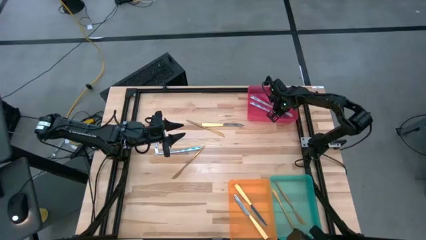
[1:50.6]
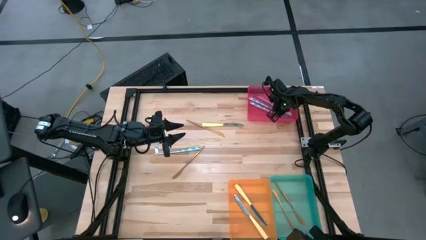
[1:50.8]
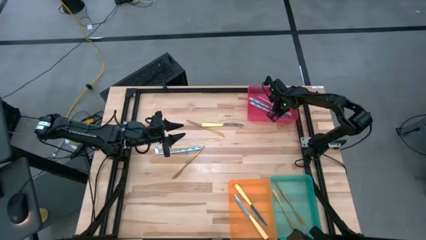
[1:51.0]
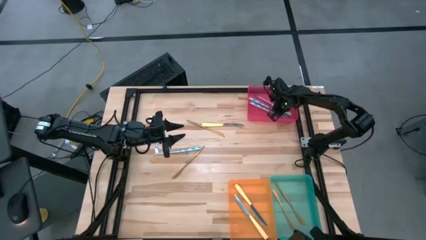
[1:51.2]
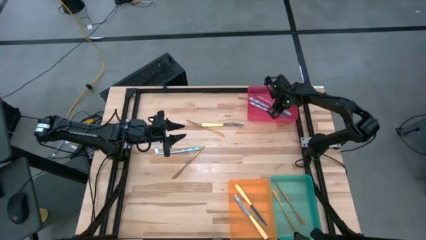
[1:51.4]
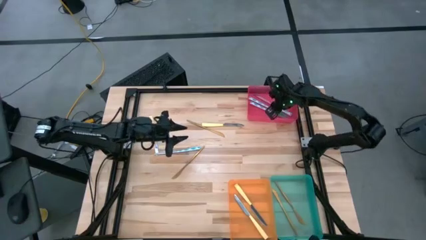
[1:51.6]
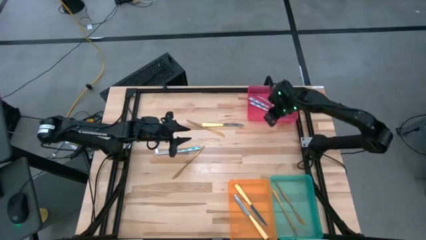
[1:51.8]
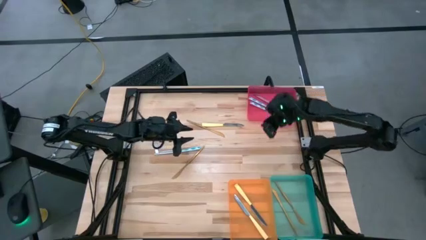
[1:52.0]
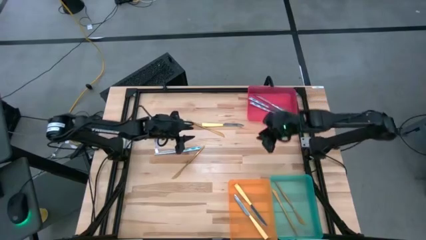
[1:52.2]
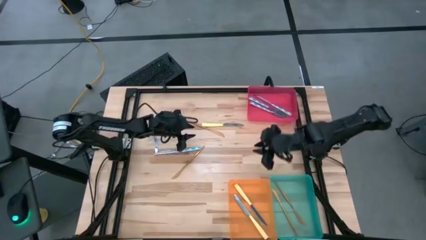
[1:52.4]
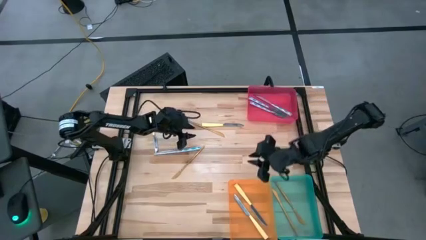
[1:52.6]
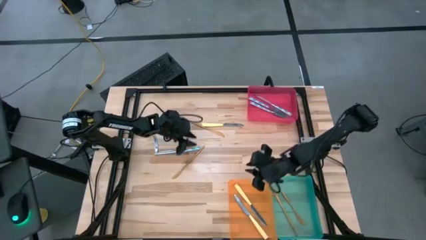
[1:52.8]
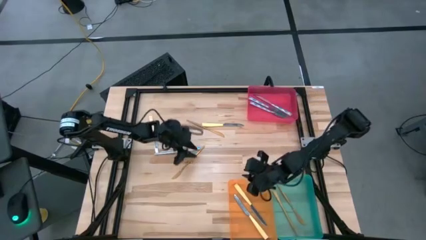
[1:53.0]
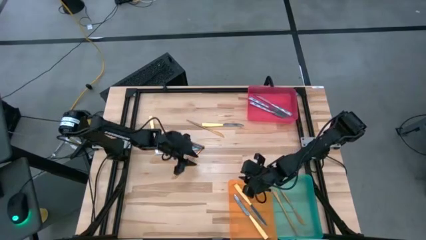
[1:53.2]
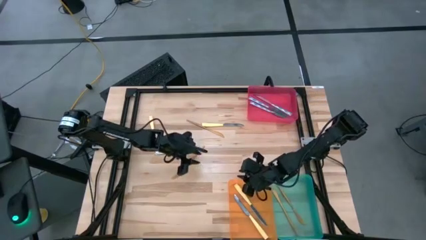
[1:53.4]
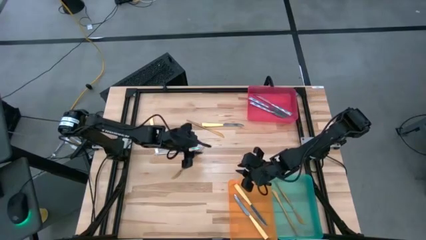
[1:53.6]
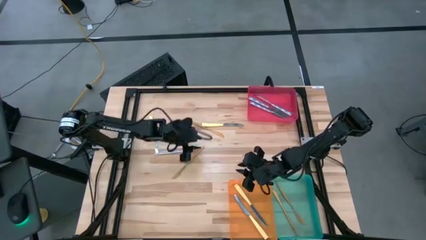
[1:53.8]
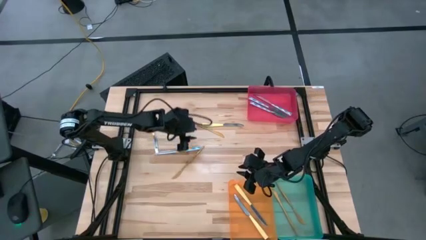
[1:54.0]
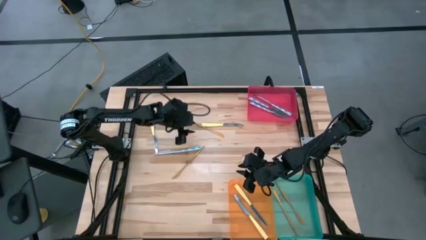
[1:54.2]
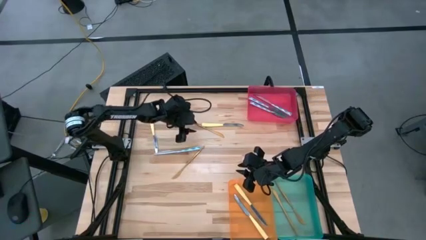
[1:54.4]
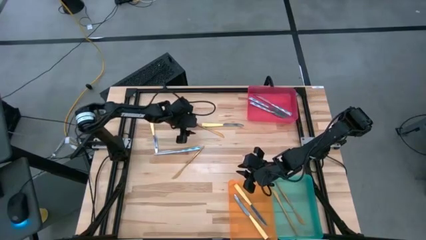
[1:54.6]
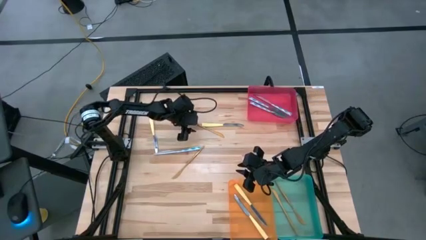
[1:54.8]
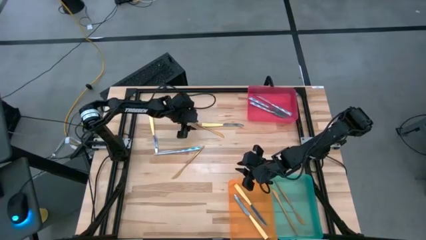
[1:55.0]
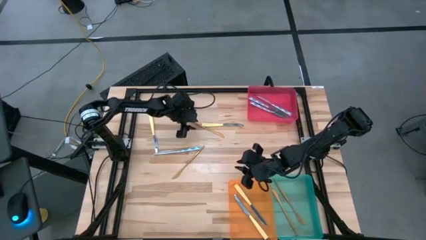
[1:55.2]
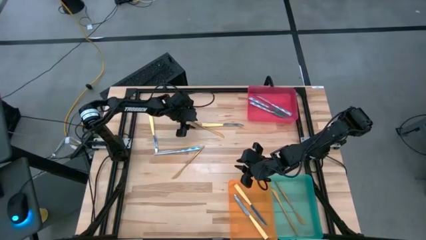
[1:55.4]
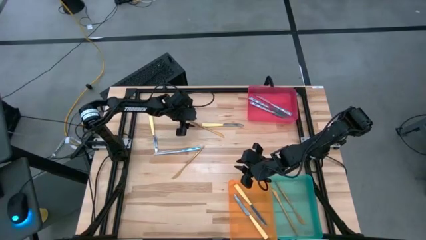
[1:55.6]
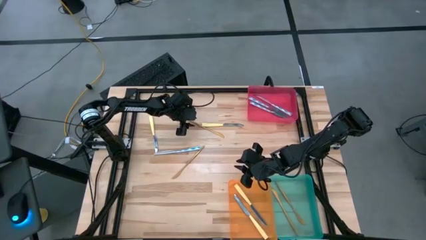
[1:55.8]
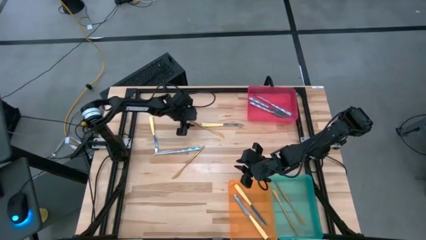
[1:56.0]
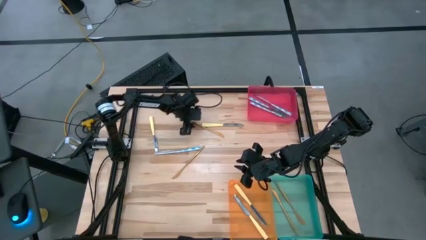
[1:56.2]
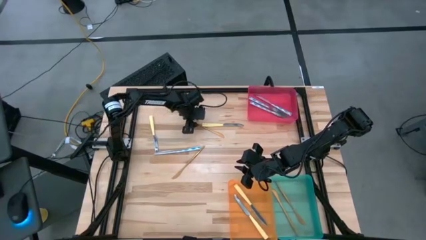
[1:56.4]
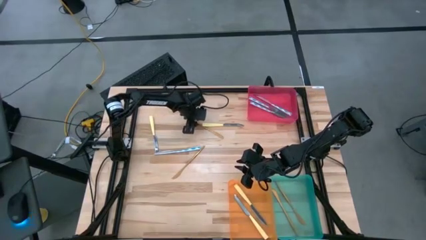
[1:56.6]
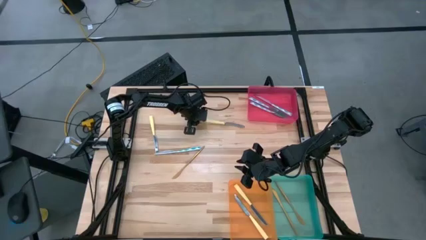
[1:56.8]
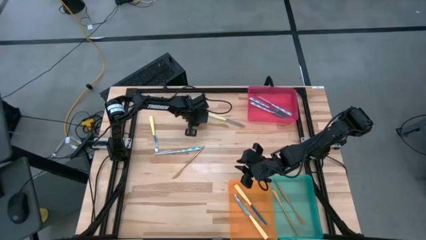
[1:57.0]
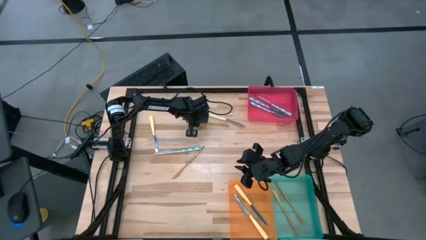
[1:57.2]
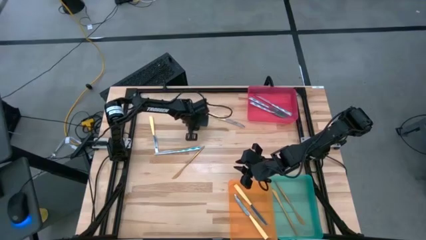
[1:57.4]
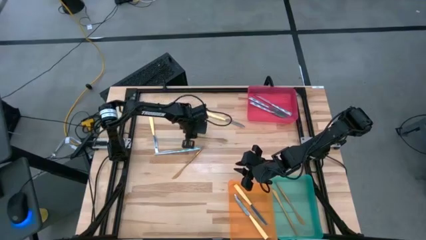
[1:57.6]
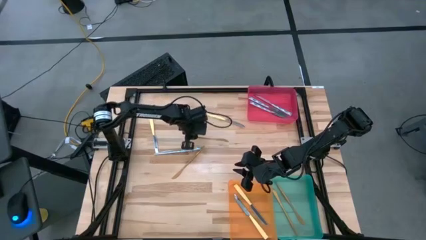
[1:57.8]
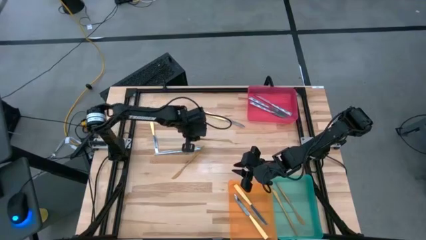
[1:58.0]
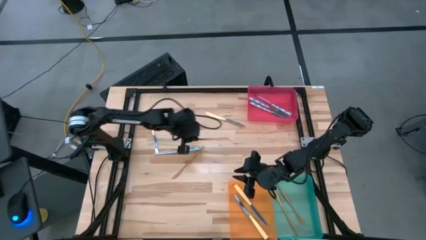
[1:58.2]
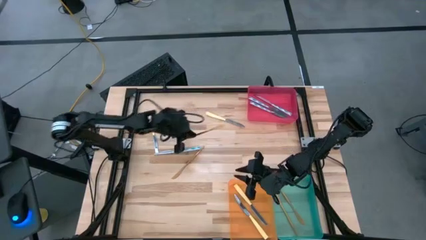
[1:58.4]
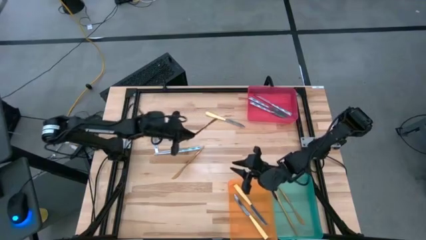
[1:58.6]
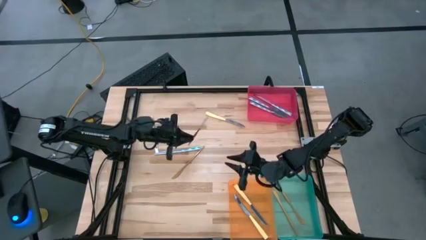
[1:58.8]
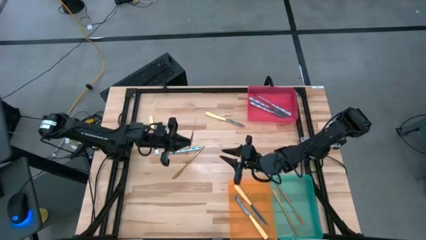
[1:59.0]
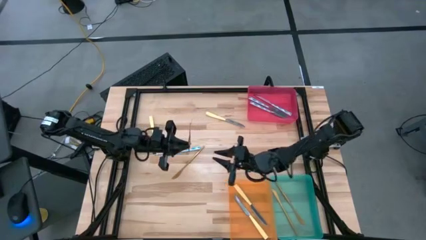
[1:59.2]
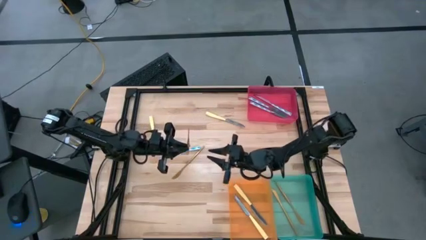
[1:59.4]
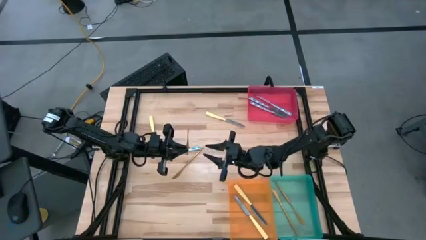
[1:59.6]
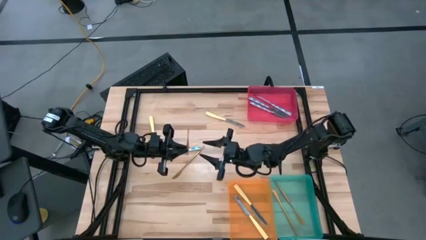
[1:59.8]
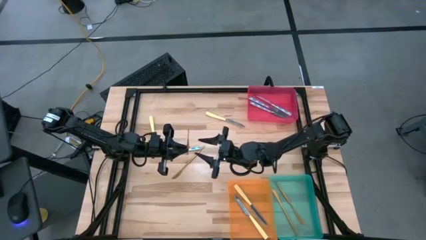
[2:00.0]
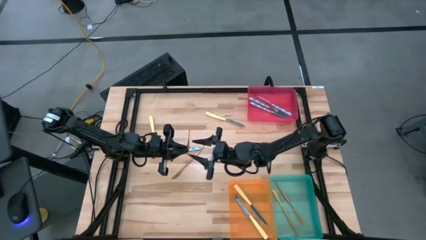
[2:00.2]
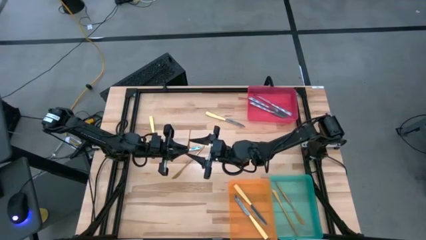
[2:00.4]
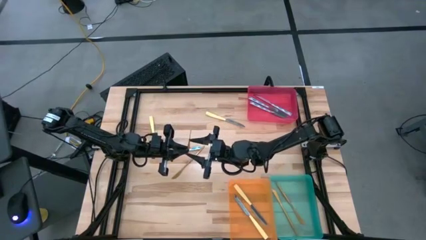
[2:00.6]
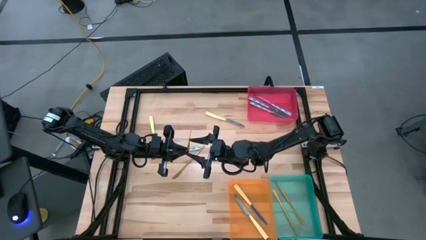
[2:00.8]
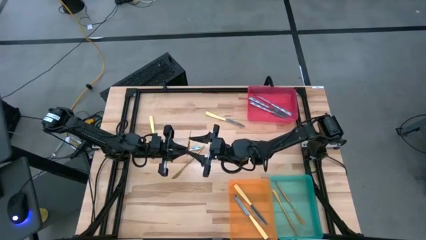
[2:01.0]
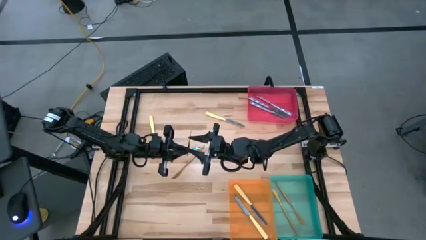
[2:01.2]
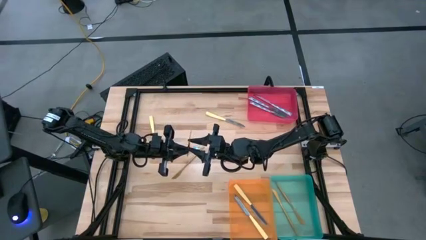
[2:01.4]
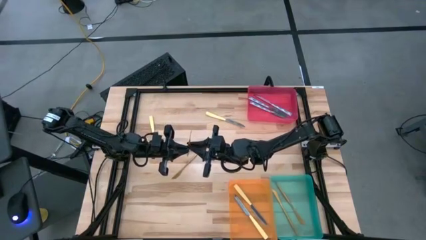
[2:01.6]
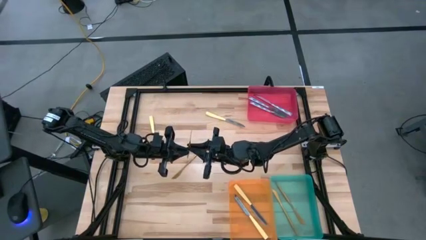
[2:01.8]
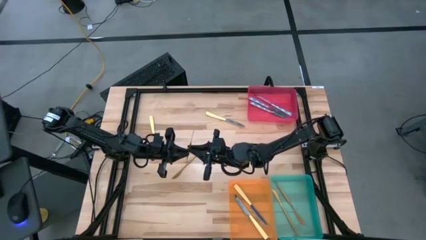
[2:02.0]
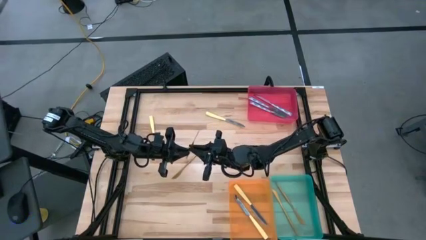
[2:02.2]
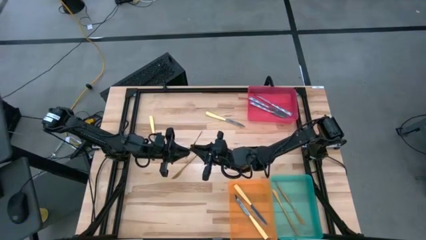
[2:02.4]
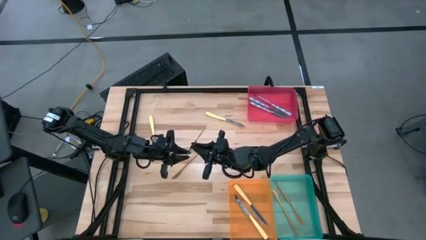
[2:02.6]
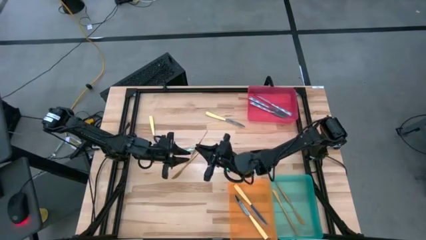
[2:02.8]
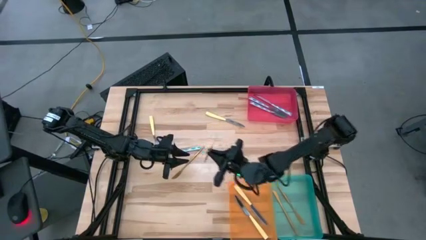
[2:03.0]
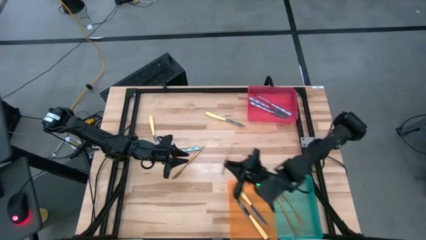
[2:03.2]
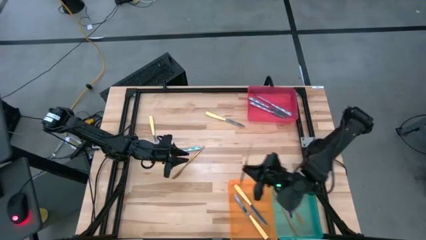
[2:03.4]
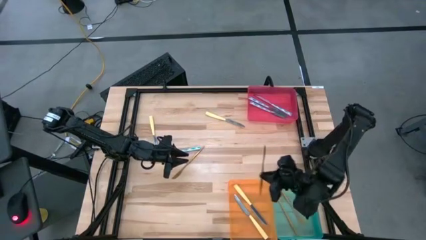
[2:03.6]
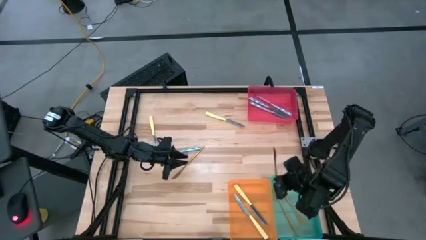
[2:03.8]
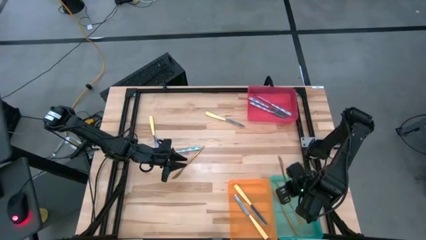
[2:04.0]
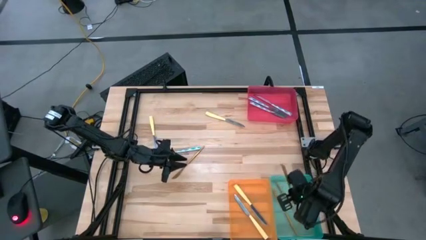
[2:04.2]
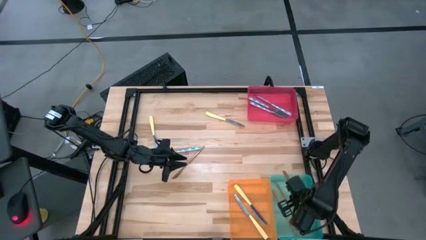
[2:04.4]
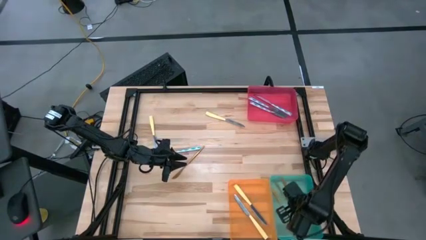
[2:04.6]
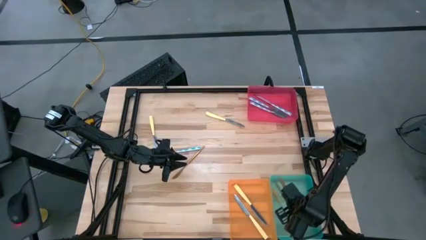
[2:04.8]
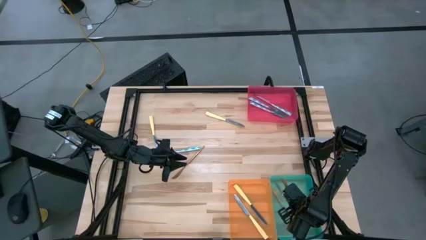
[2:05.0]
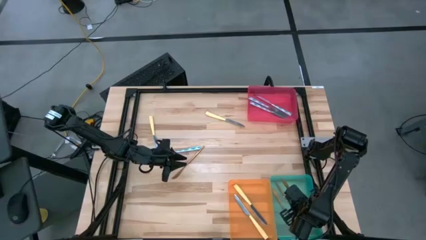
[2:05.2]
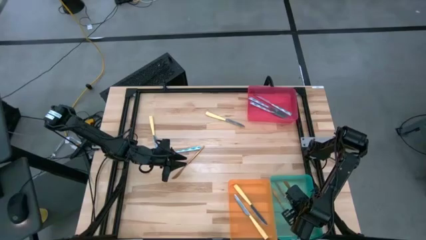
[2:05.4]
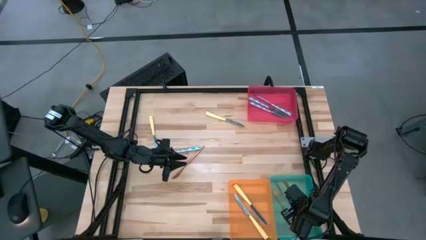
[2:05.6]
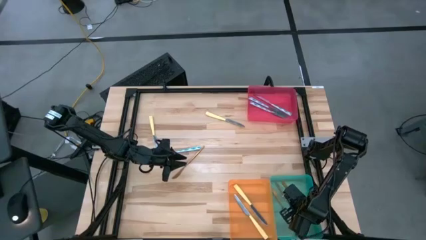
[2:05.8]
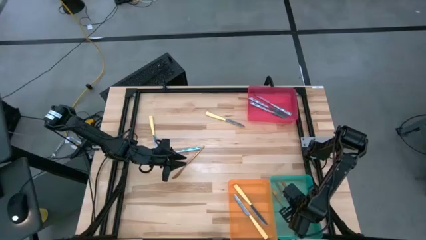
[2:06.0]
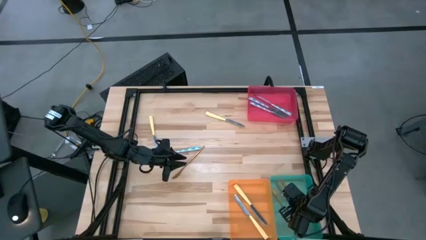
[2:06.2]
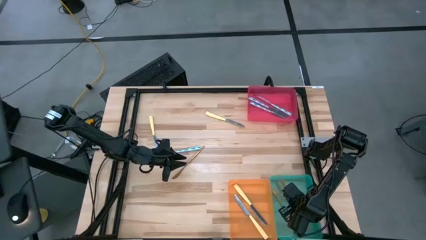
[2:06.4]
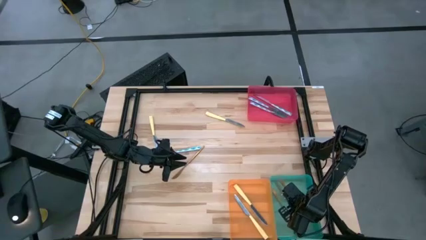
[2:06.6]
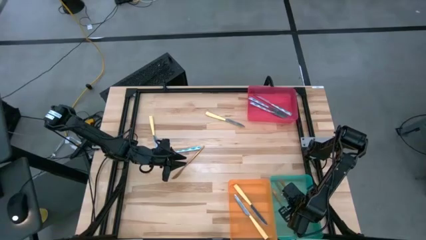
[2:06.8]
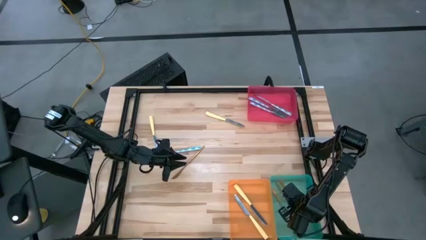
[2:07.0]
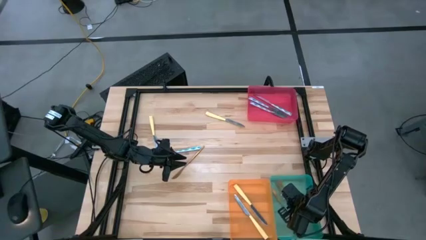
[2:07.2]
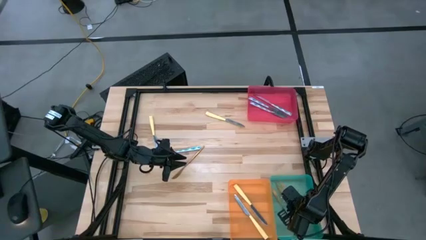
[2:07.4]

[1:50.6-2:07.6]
Task: Sort silverware by color (type)
Put the gold knife into the orange bin
